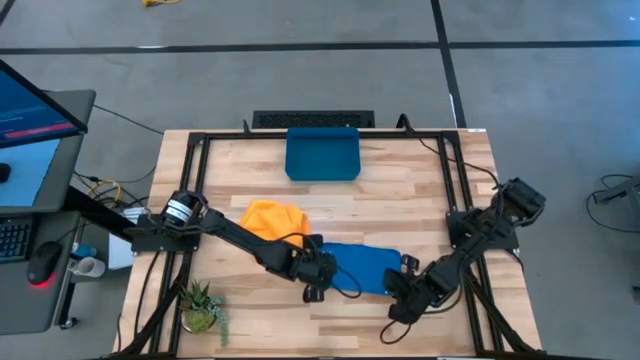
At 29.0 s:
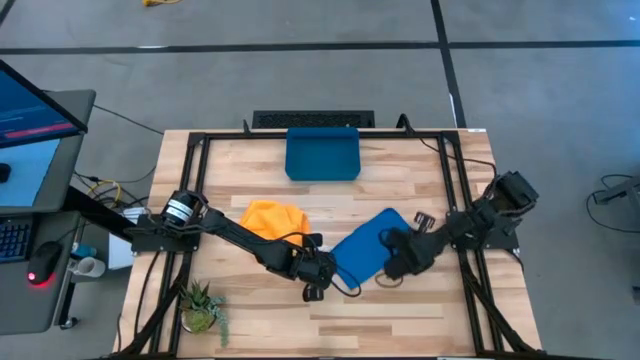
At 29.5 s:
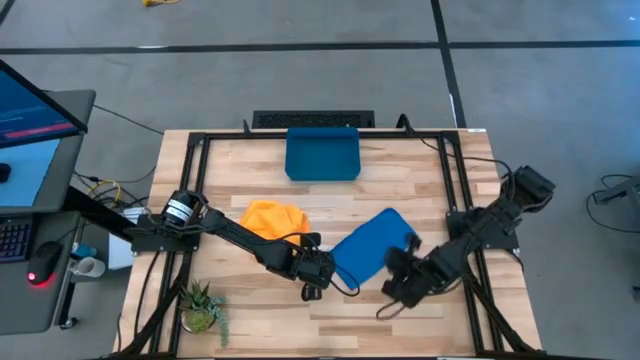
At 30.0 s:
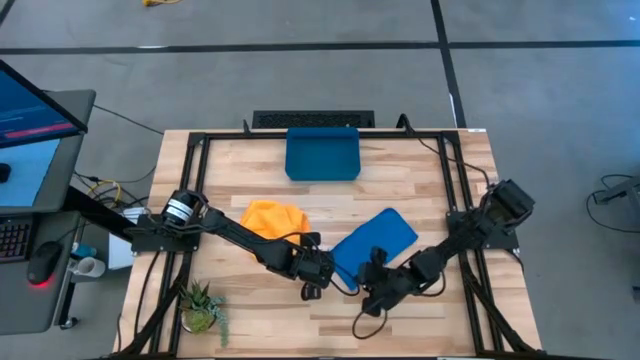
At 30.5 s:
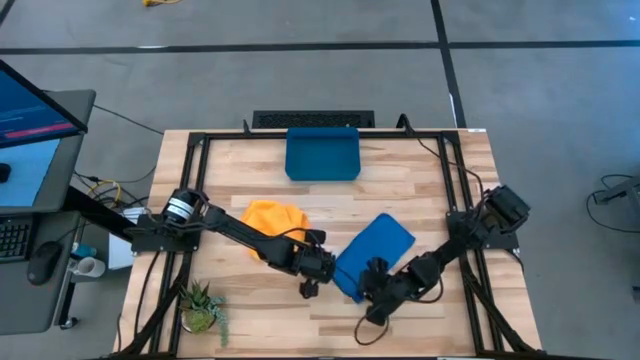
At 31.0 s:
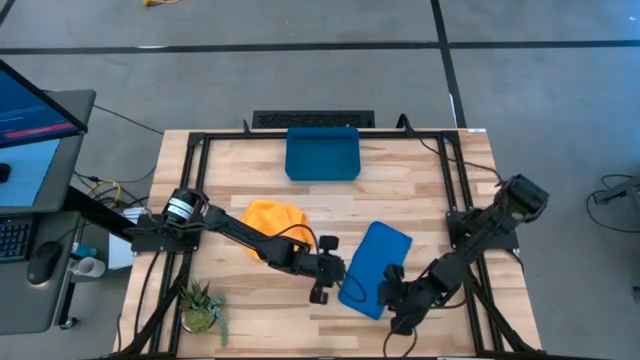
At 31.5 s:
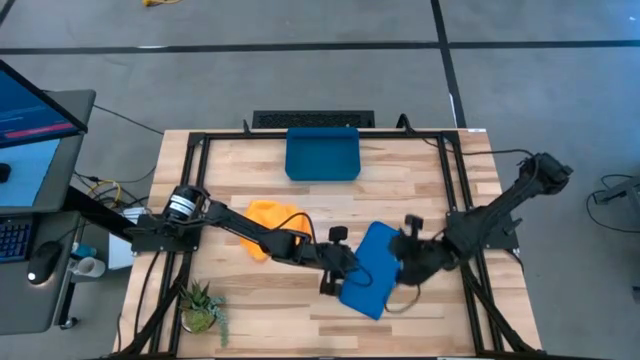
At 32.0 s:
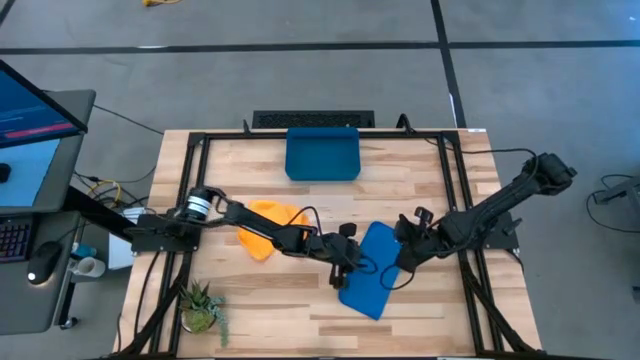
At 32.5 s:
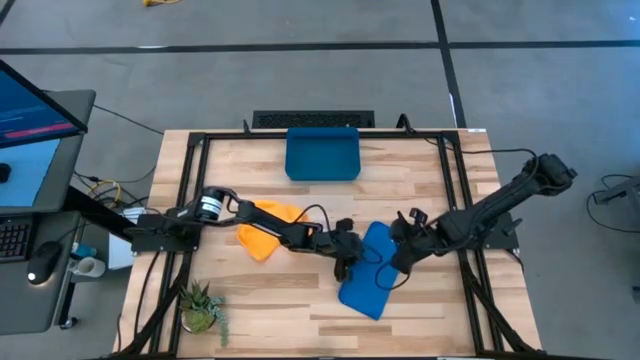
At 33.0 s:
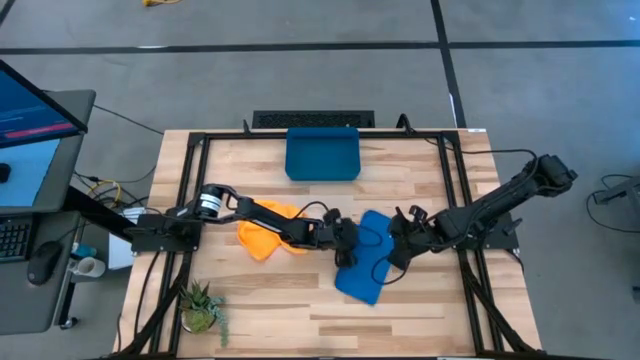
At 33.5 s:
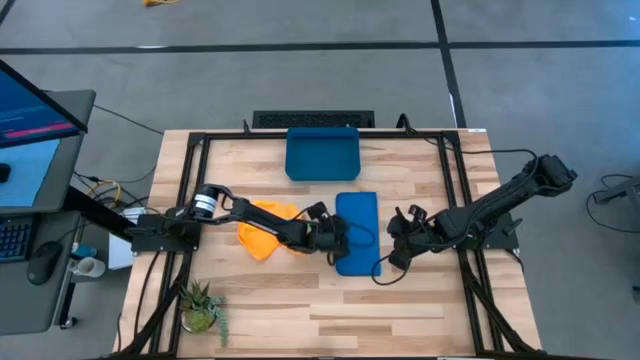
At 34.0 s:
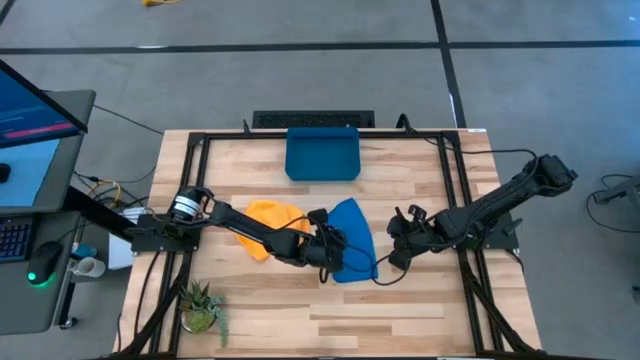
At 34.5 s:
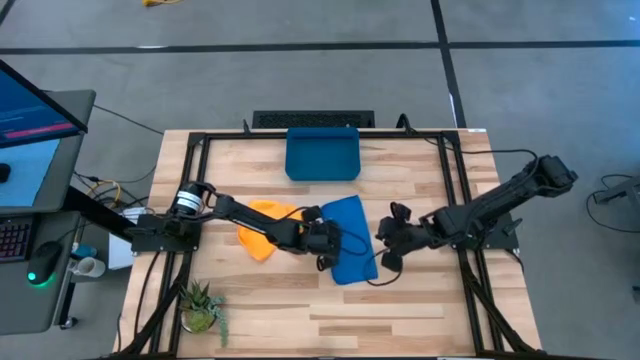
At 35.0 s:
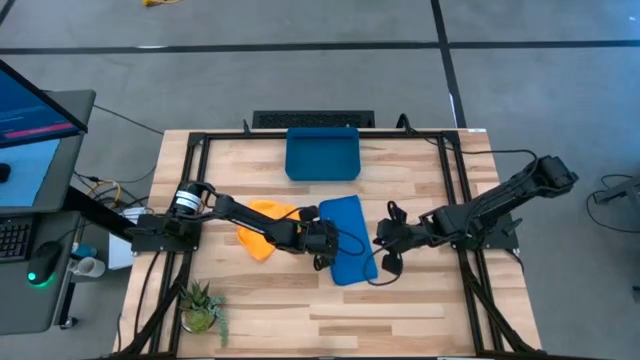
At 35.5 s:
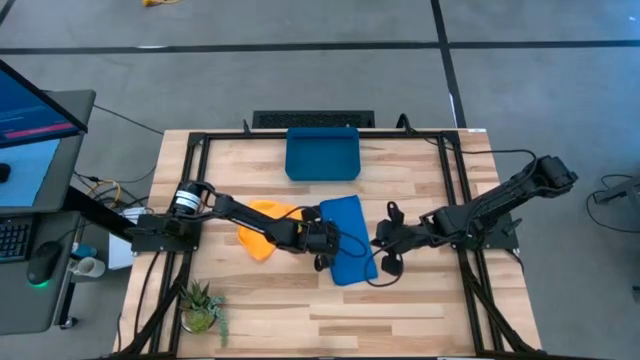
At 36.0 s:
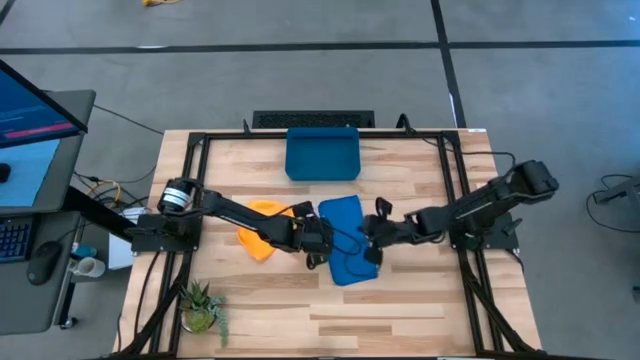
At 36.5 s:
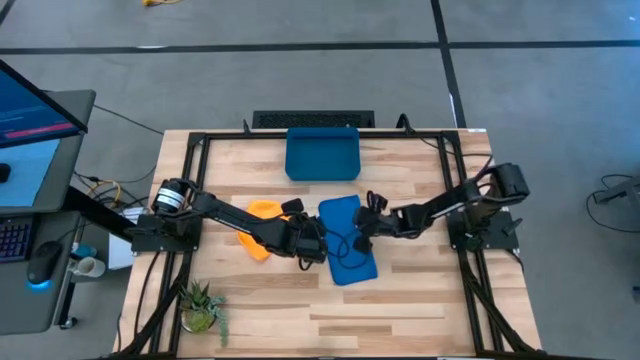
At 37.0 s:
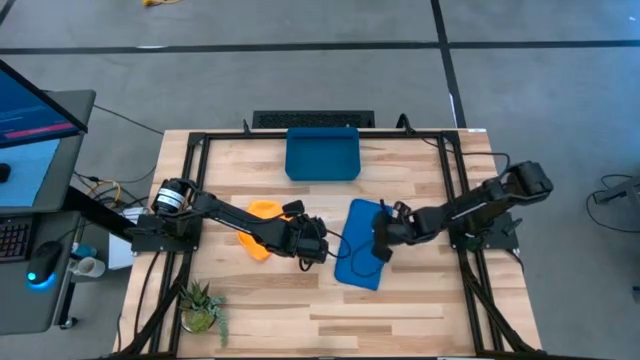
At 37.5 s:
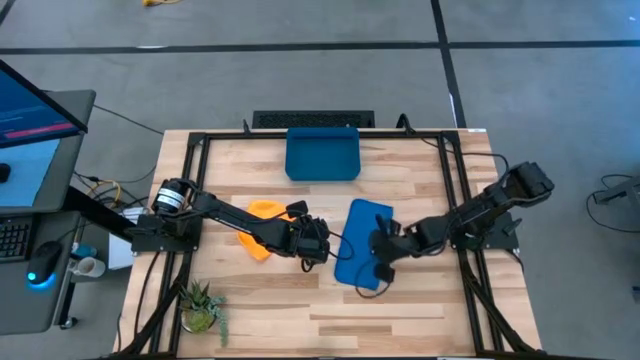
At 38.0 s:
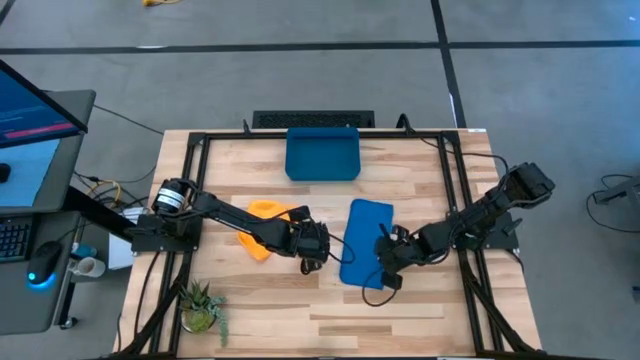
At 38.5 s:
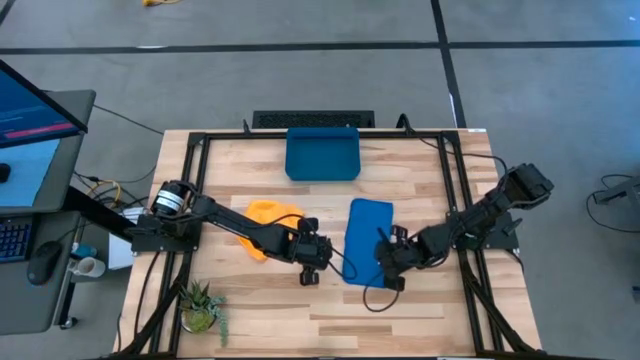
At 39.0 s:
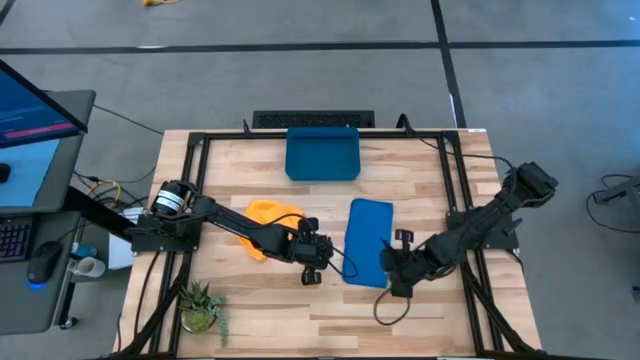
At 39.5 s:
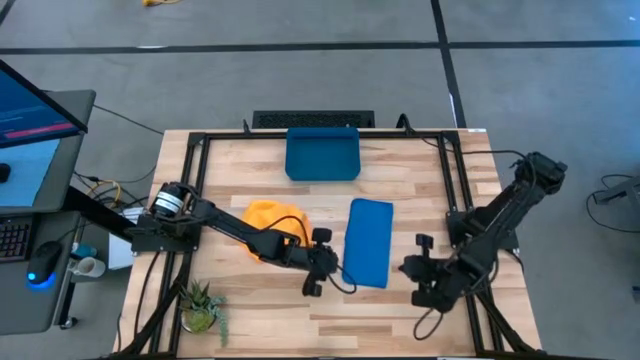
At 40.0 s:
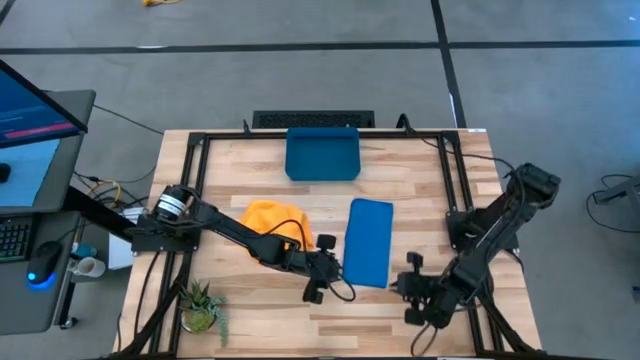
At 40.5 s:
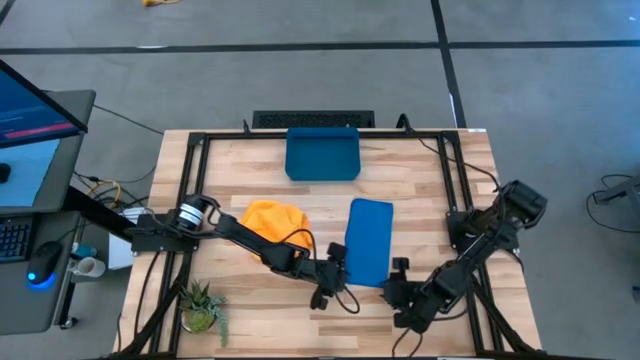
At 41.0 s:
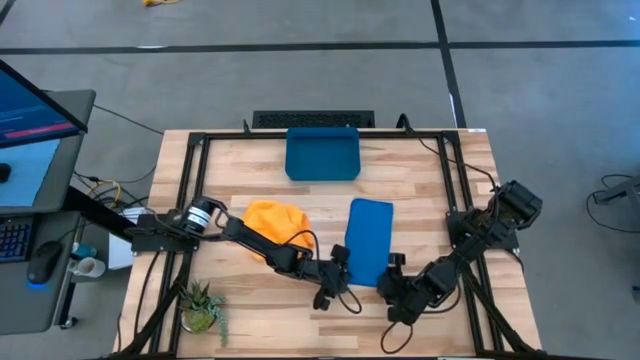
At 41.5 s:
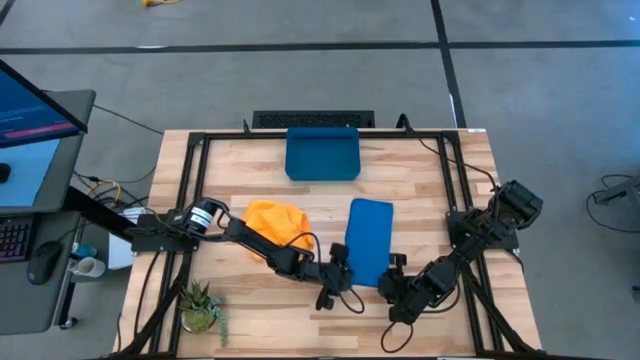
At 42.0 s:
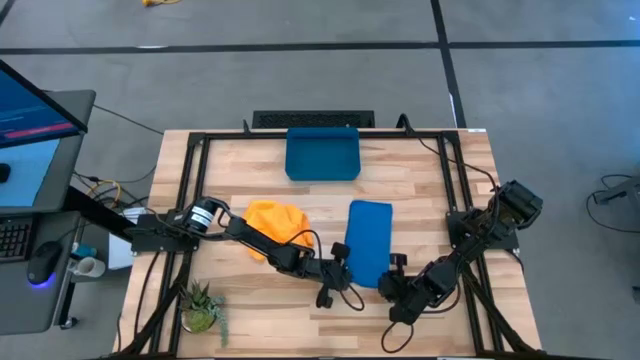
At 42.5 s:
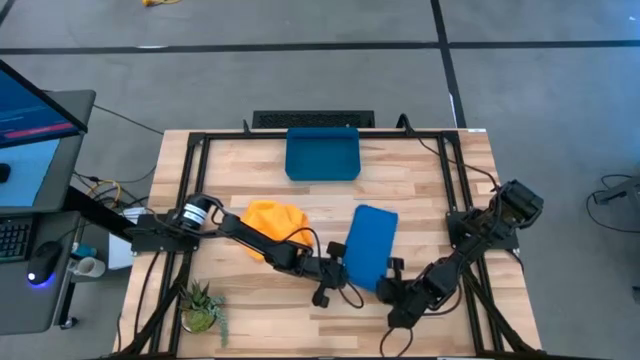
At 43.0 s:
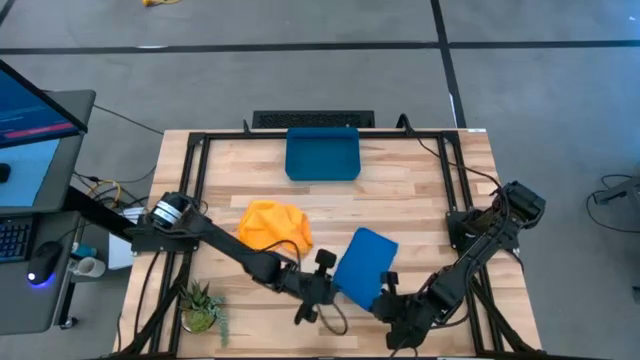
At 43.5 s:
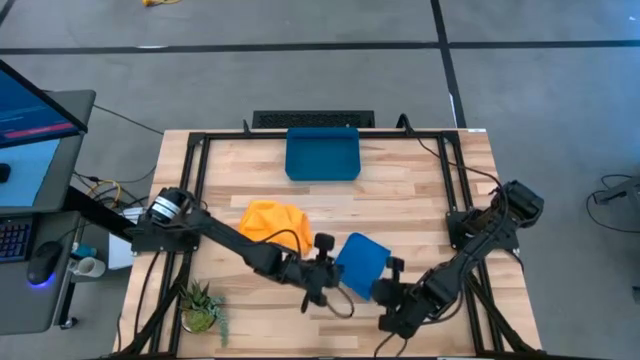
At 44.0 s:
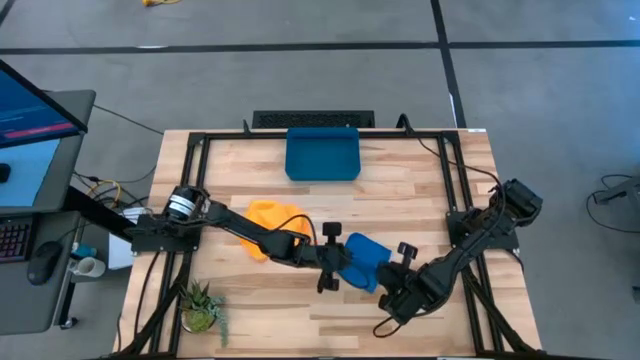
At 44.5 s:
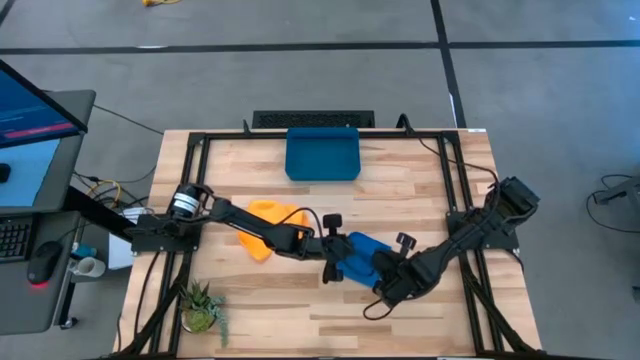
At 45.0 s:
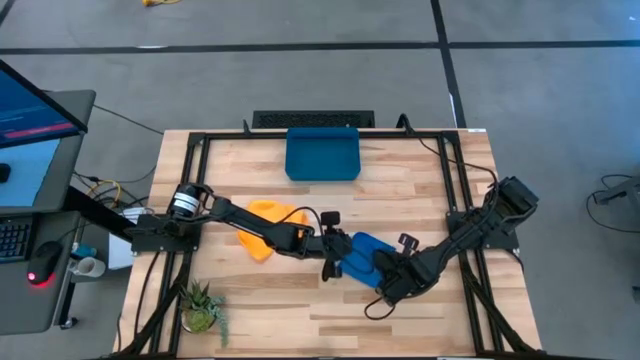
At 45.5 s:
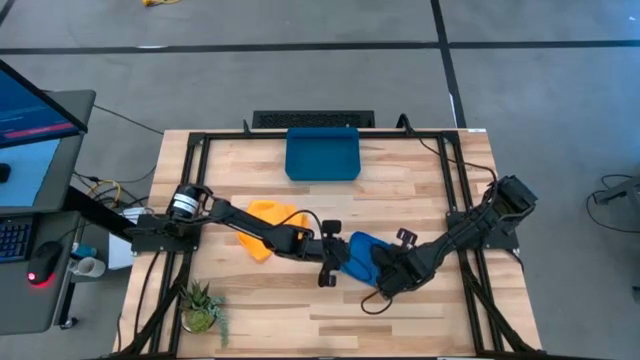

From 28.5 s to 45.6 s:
Task: Roll microfiber towels into tight, uniform cylinder then place into a basket
Fold the blue microfiber towel
